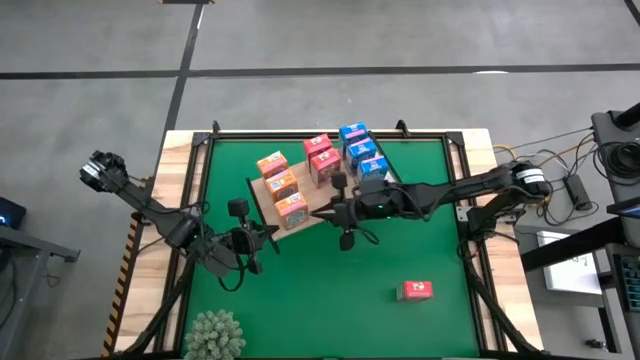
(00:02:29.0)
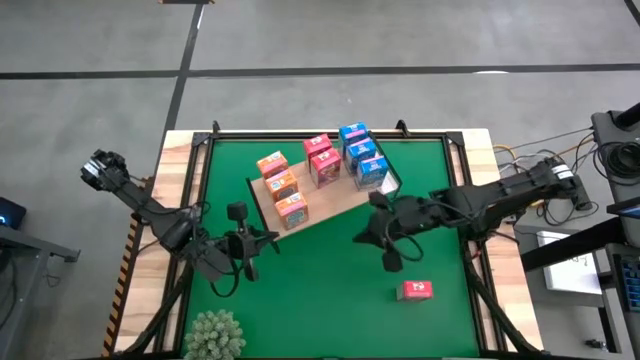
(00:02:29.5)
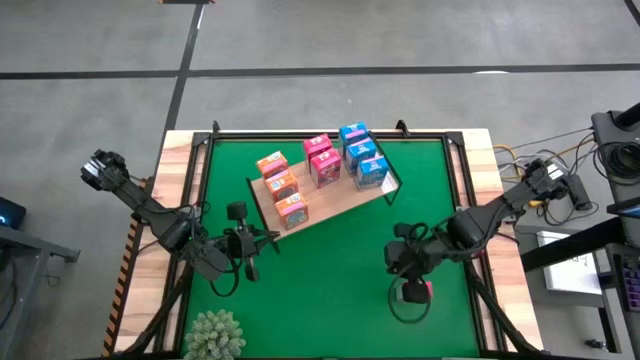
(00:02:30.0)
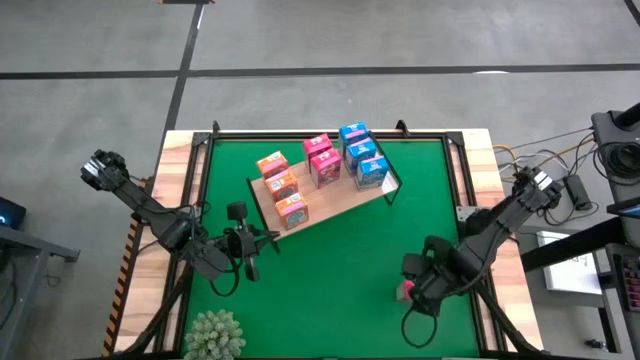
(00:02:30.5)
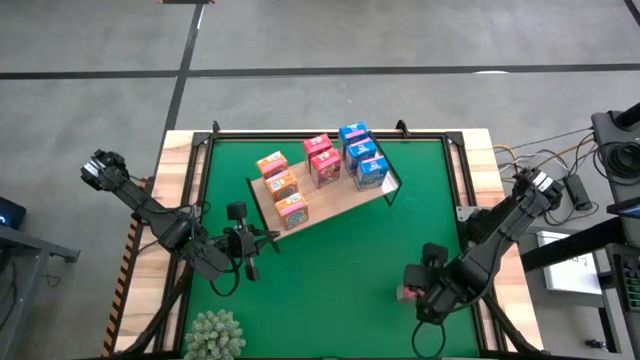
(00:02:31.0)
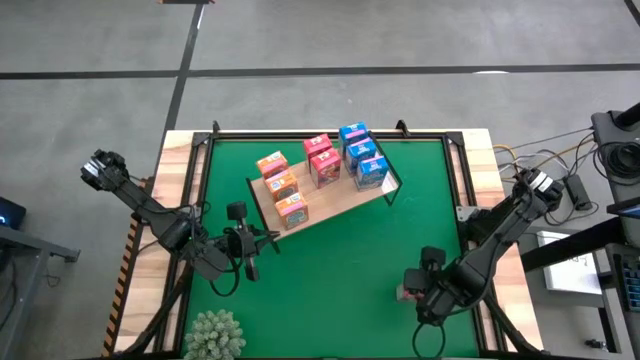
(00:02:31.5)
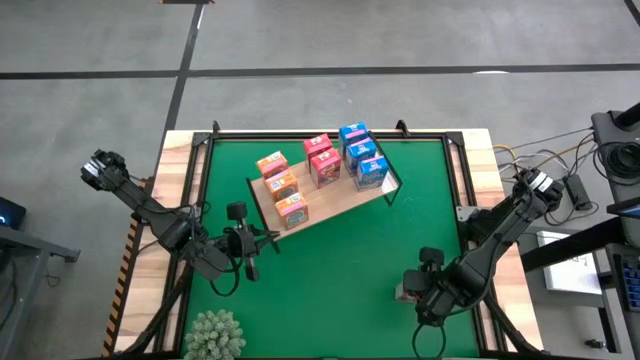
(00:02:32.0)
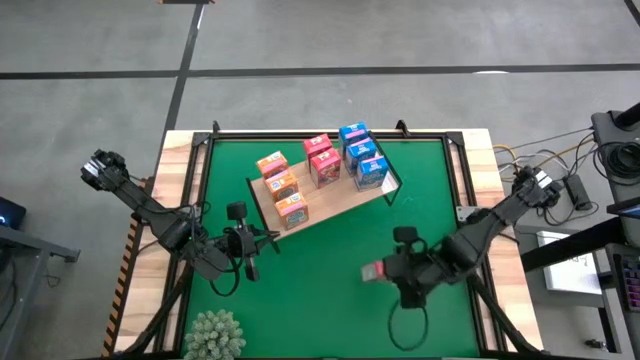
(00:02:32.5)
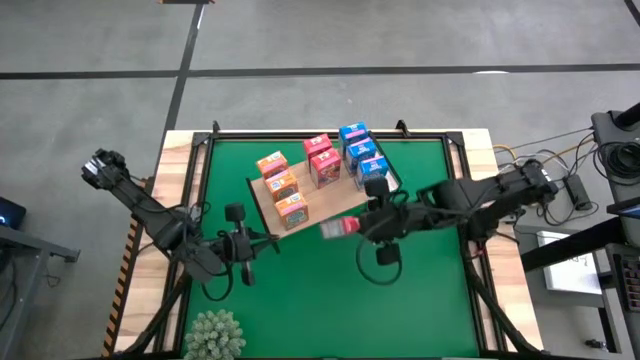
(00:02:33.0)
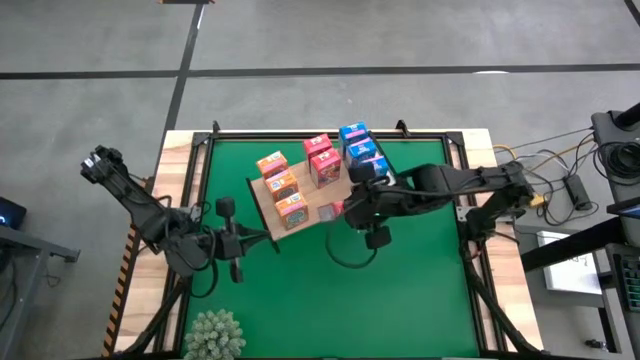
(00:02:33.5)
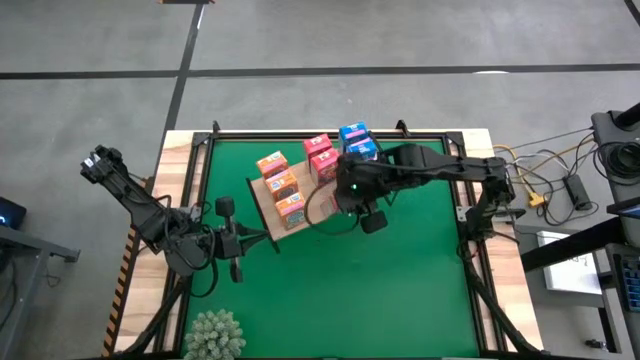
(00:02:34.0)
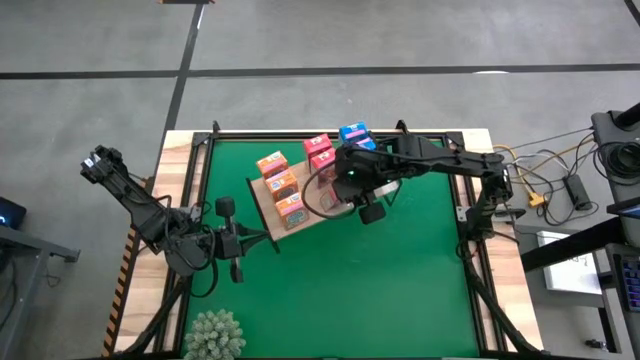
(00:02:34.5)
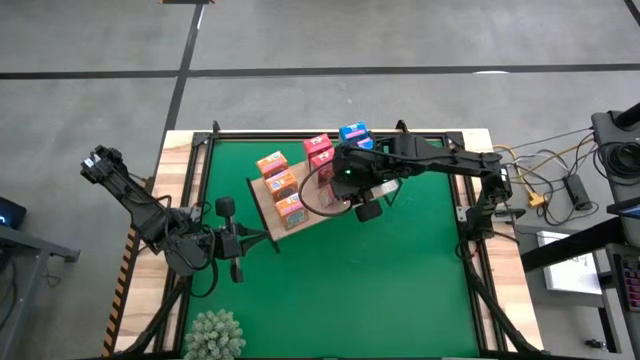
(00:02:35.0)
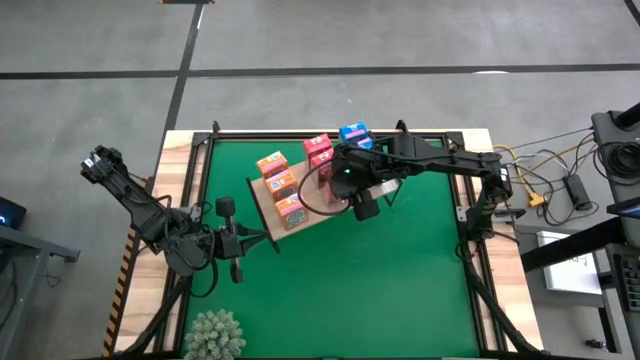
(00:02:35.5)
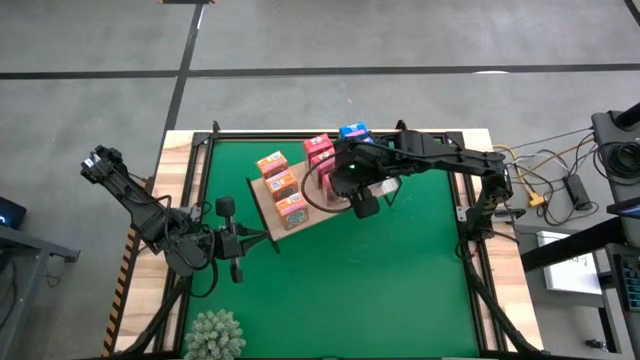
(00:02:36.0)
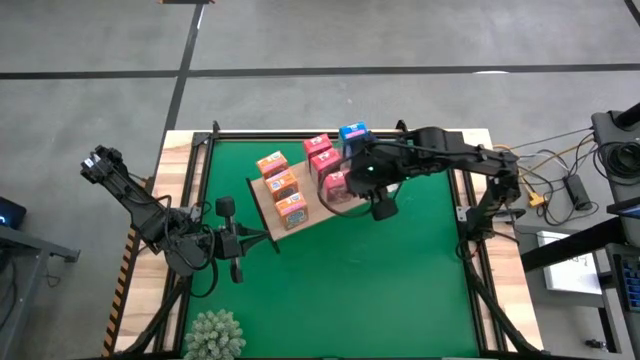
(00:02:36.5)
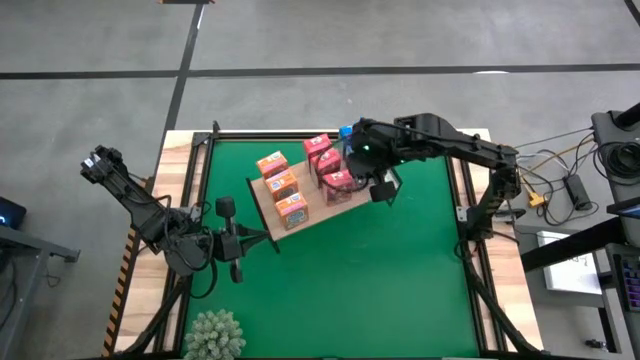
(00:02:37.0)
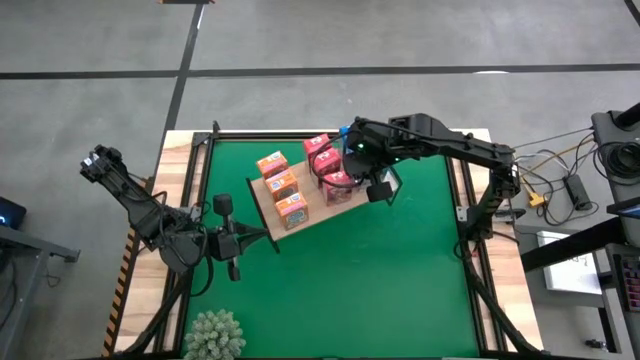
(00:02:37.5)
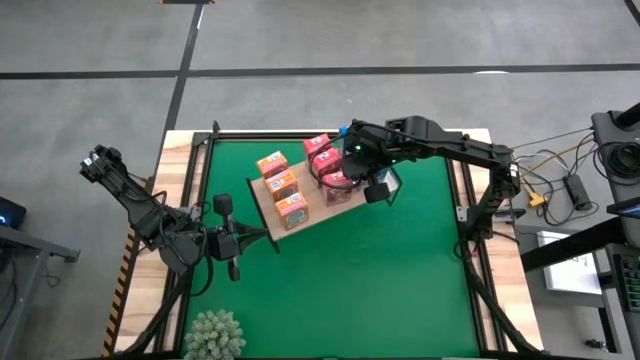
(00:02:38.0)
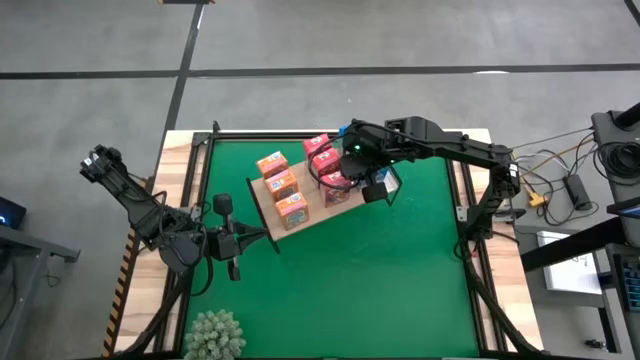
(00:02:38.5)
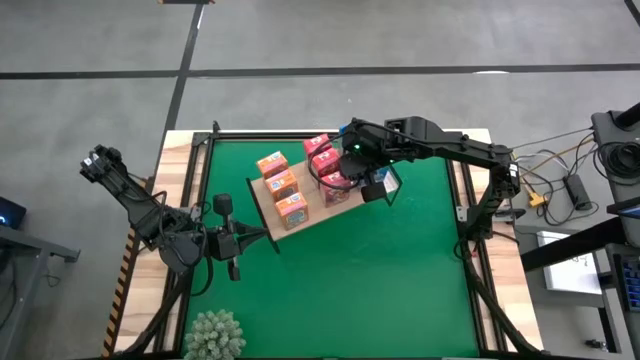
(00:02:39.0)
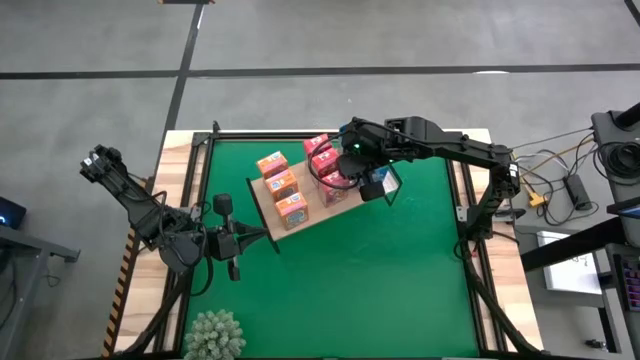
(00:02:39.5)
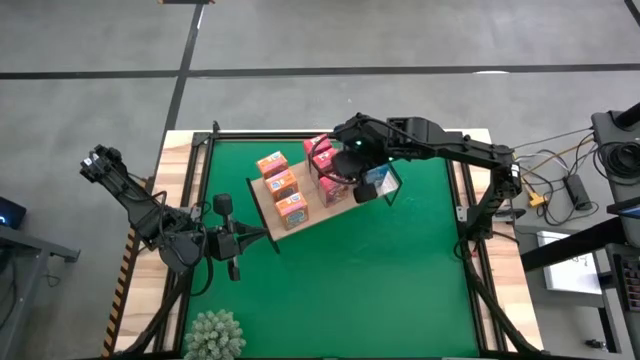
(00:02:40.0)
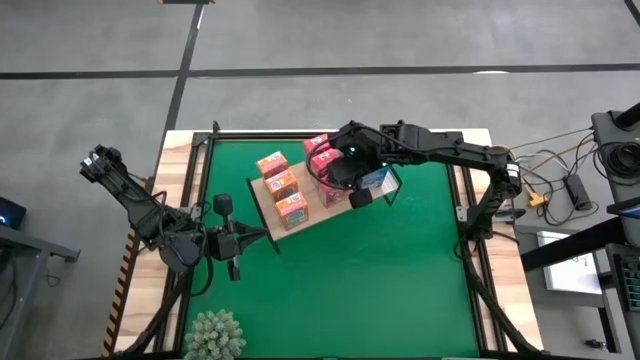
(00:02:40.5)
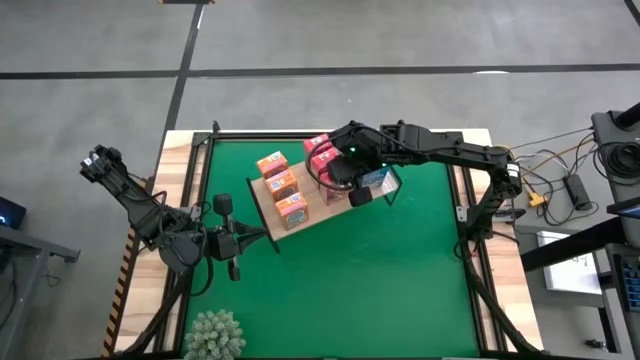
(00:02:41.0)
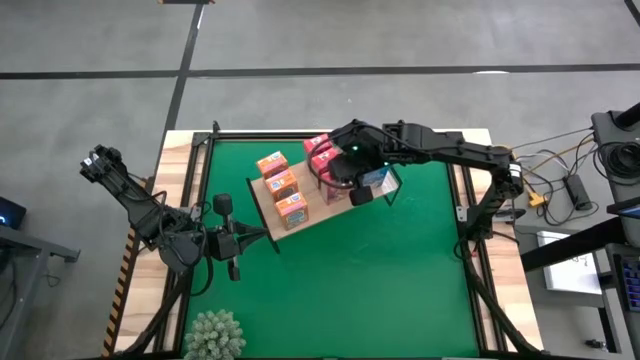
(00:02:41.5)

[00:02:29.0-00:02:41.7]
Task: Stack cereal on shelf
Put the red cereal box on the shelf aligned with other red cereal boxes

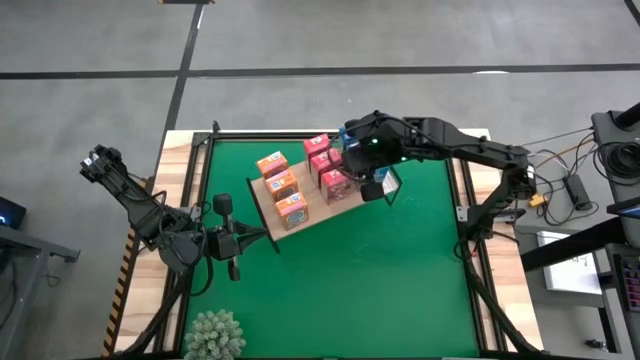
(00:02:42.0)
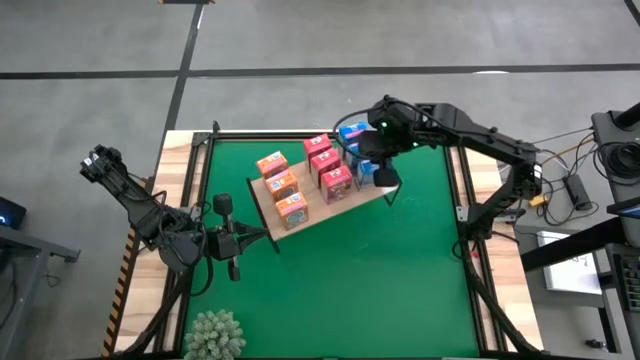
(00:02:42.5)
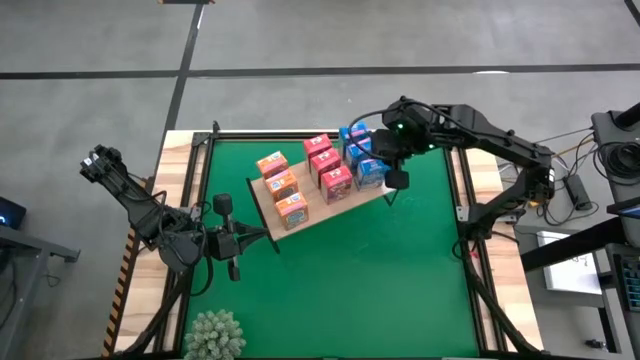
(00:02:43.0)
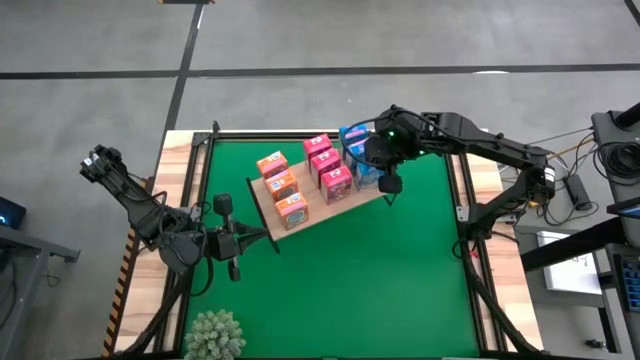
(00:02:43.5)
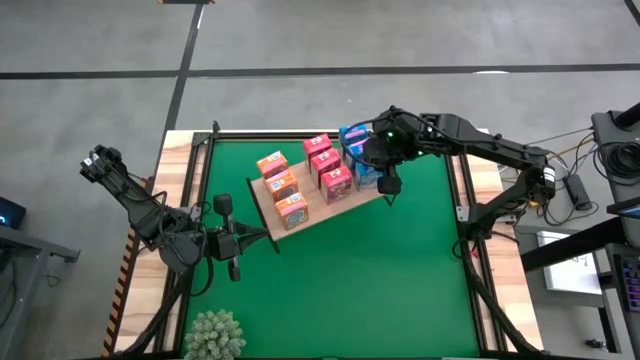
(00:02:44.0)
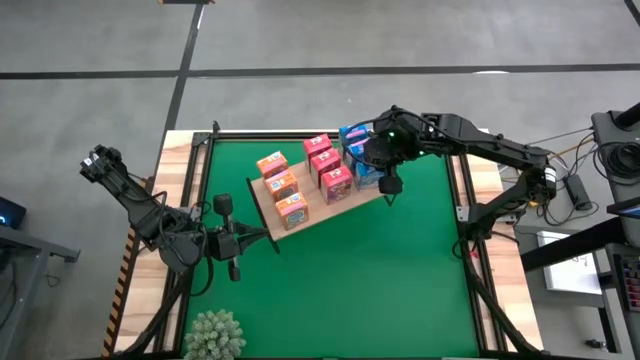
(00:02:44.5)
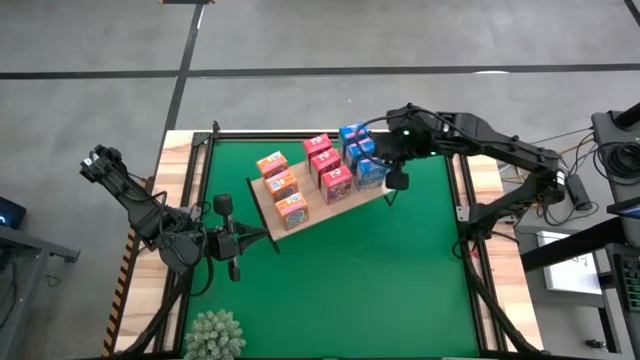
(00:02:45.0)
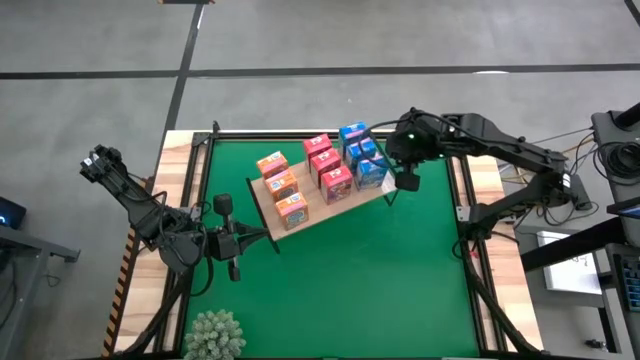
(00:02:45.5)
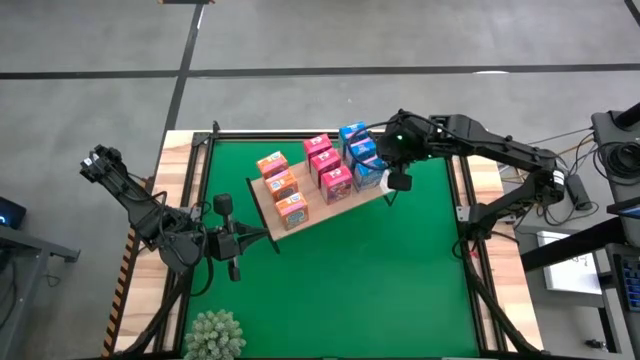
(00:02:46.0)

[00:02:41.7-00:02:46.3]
Adjust the blue cereal box on the shelf

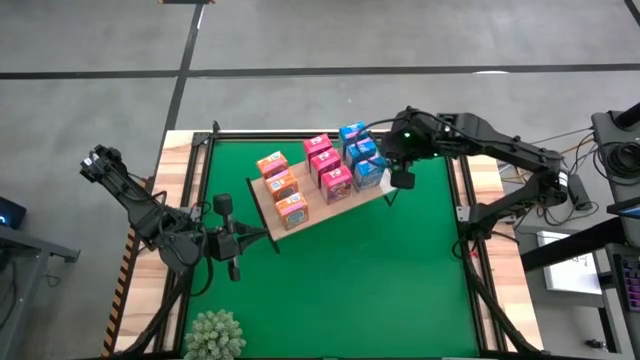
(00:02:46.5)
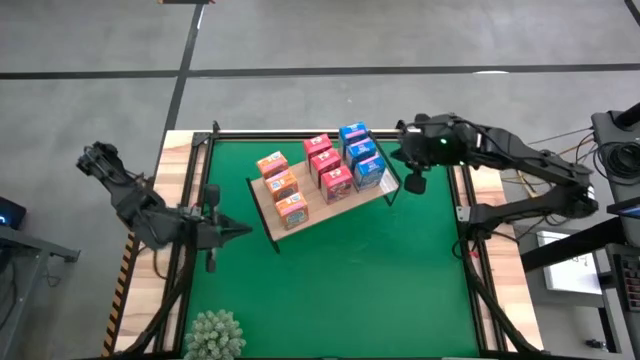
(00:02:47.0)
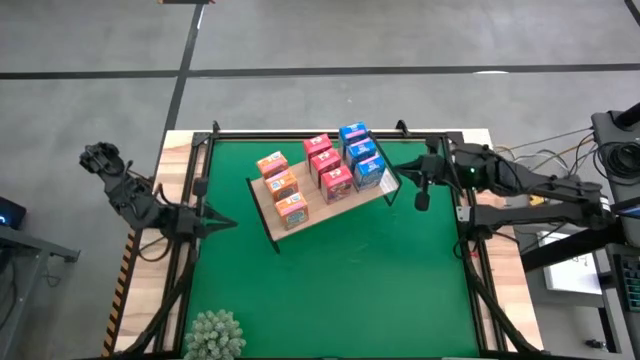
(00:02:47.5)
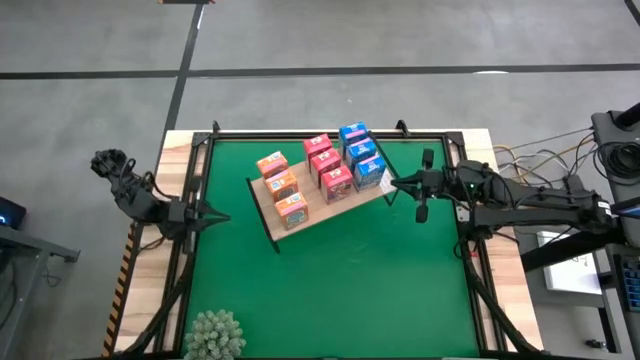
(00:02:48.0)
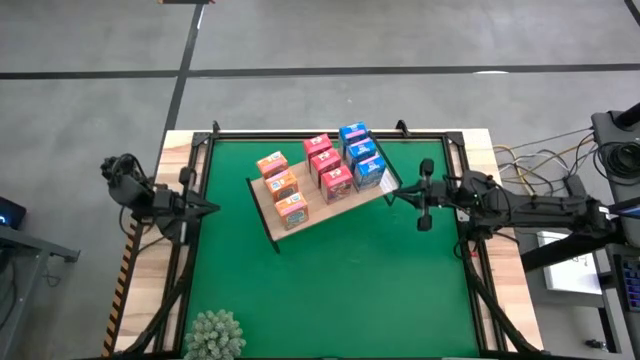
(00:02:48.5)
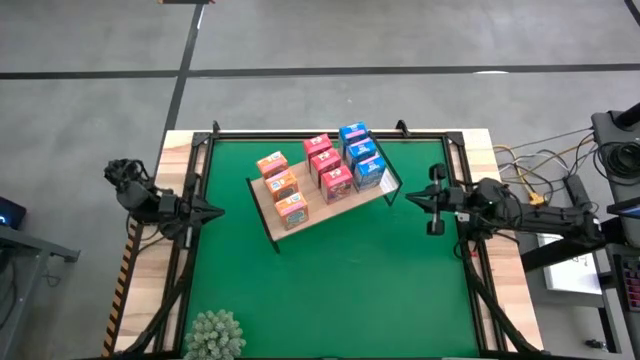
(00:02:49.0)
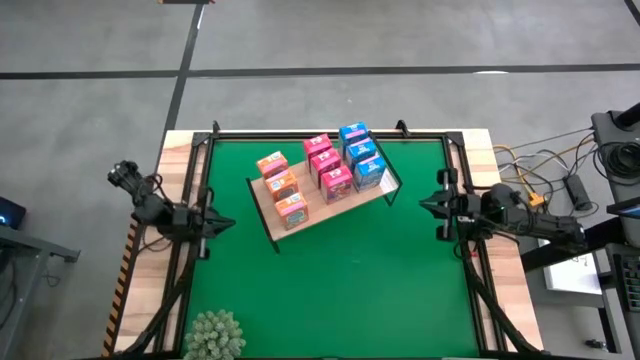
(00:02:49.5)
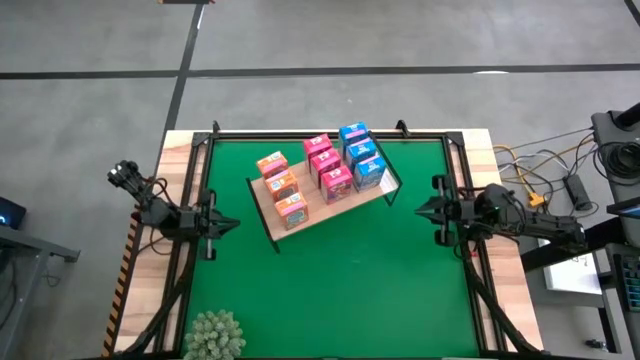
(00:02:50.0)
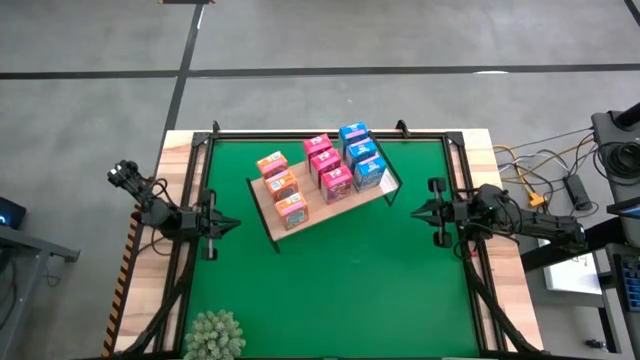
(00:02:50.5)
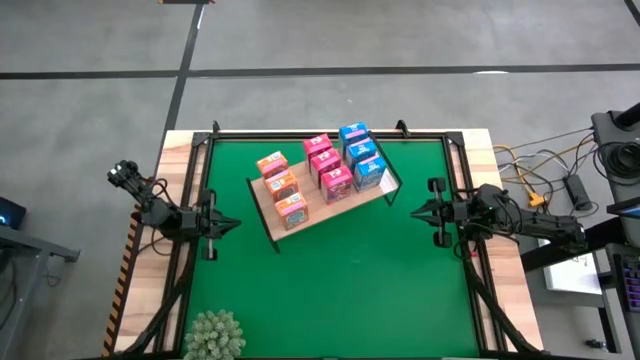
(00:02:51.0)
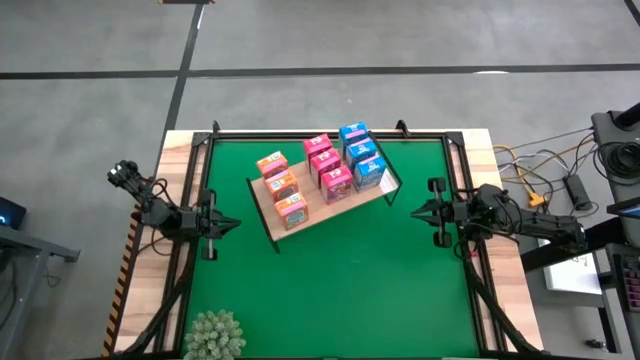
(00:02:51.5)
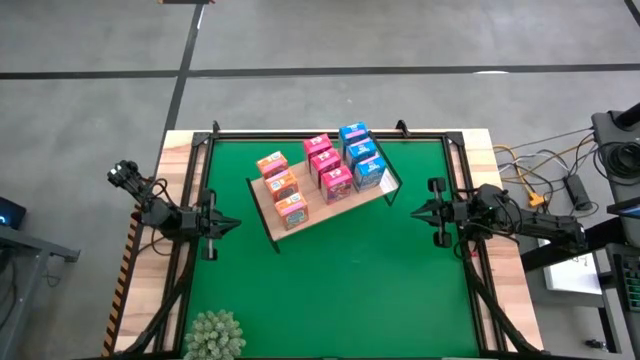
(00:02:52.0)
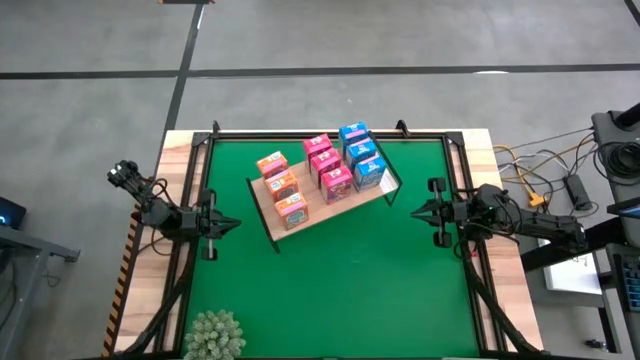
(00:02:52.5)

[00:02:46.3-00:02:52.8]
Return to Home Position
